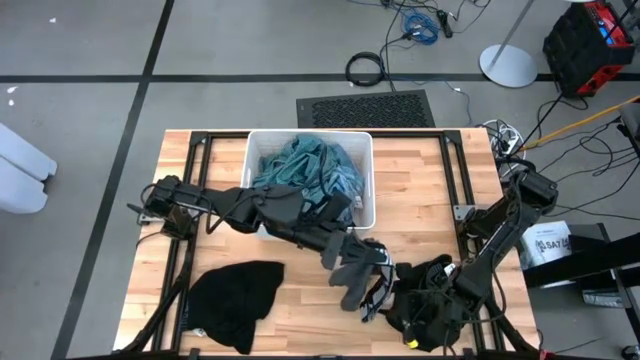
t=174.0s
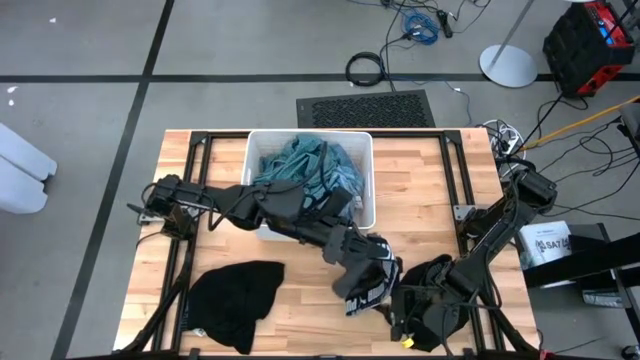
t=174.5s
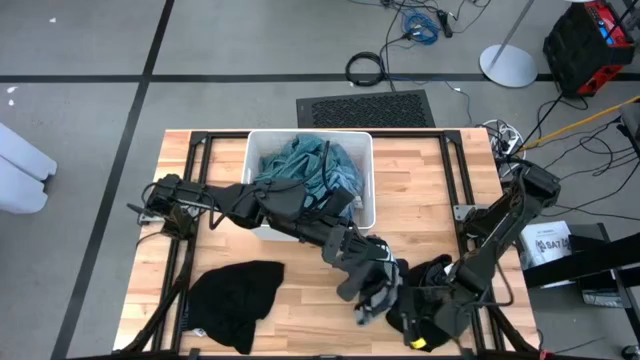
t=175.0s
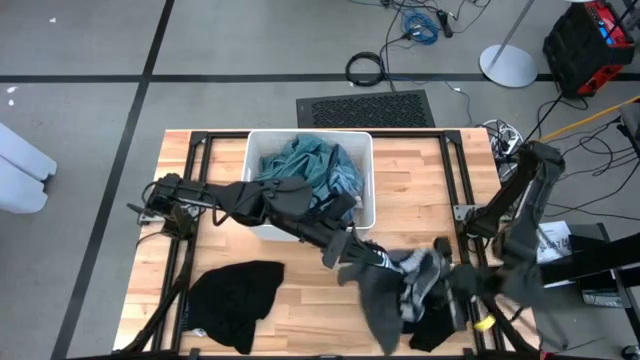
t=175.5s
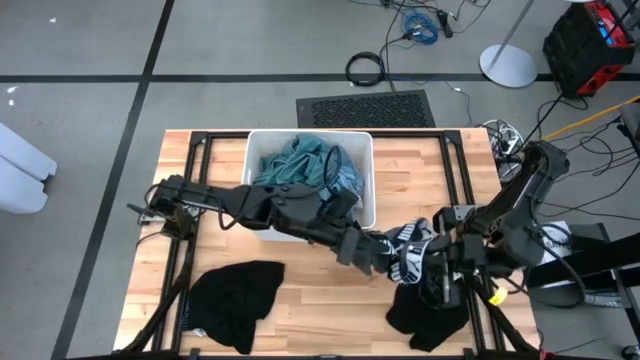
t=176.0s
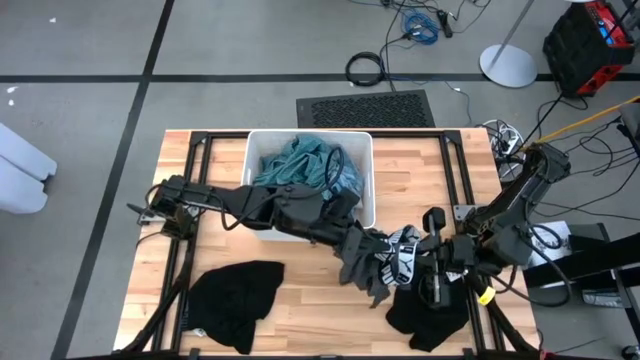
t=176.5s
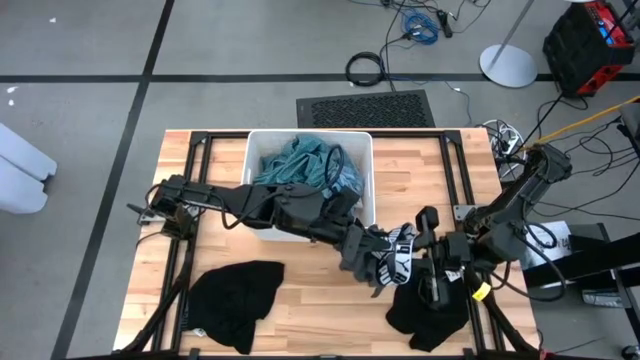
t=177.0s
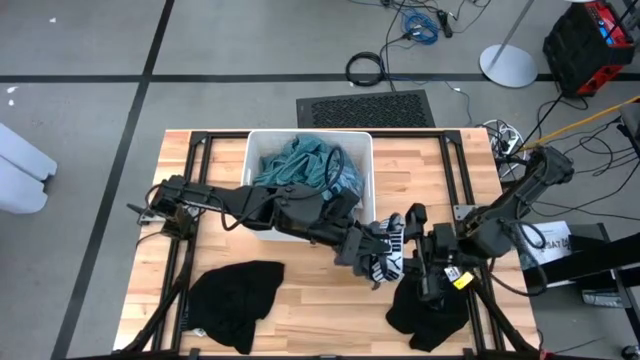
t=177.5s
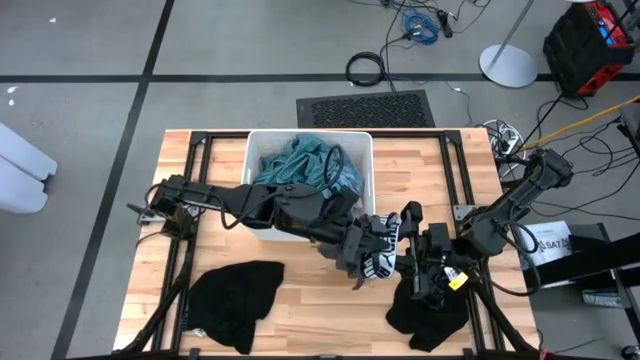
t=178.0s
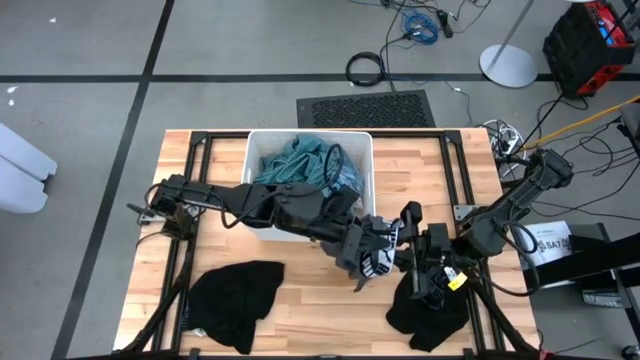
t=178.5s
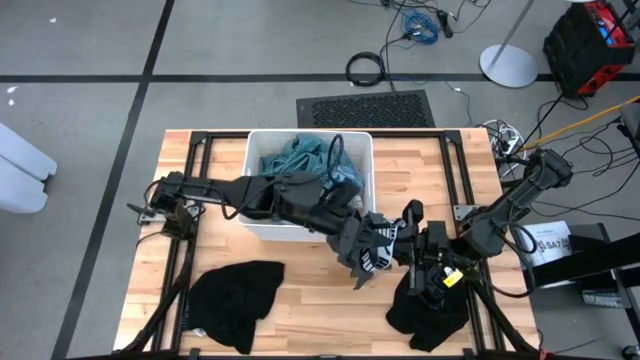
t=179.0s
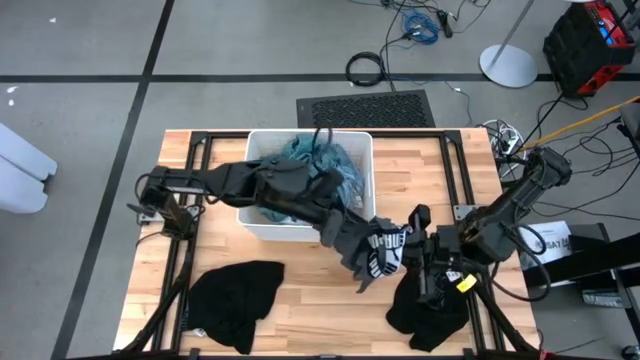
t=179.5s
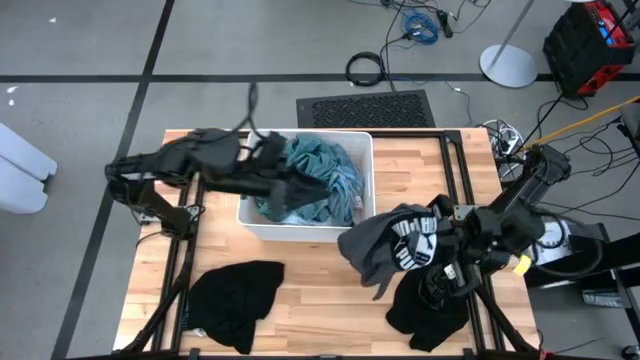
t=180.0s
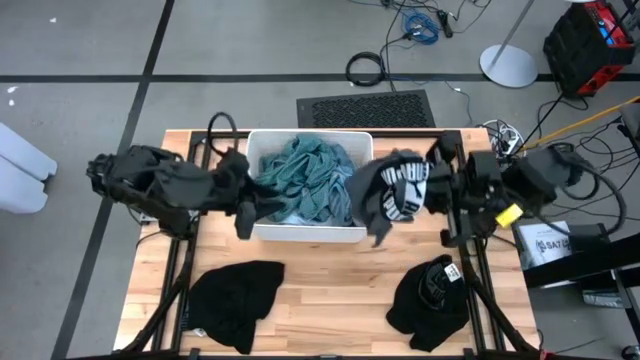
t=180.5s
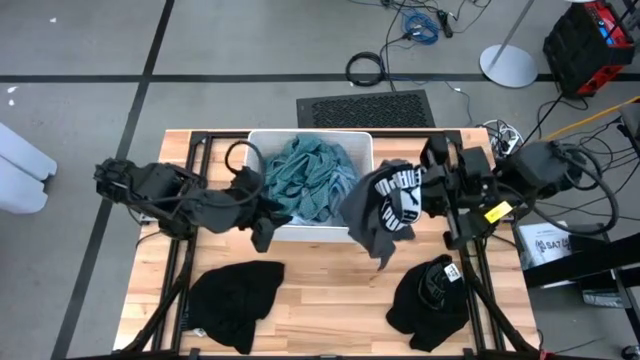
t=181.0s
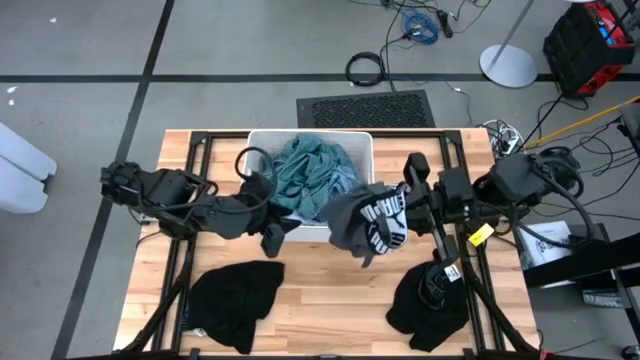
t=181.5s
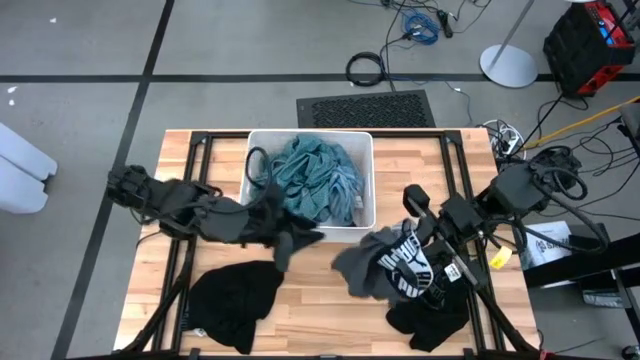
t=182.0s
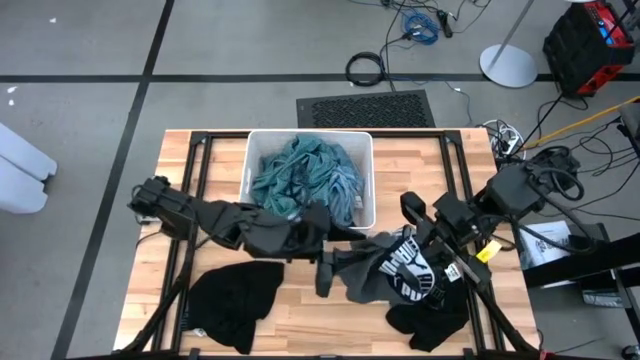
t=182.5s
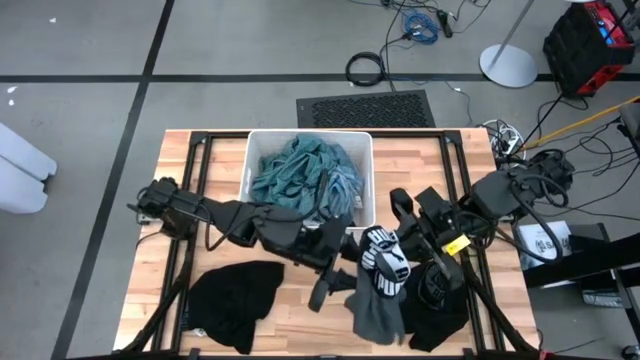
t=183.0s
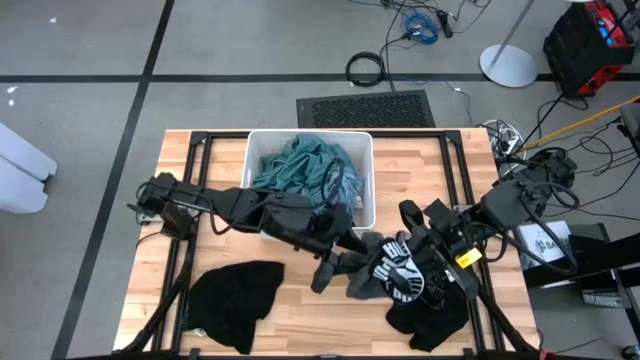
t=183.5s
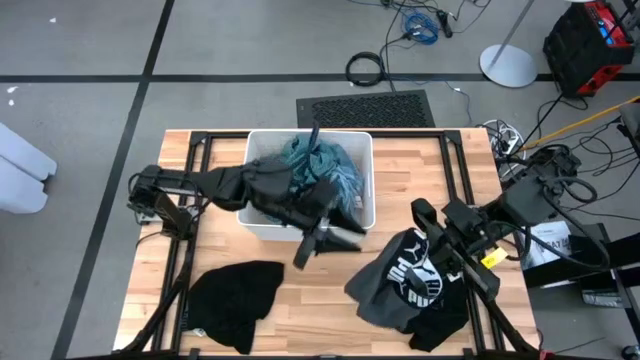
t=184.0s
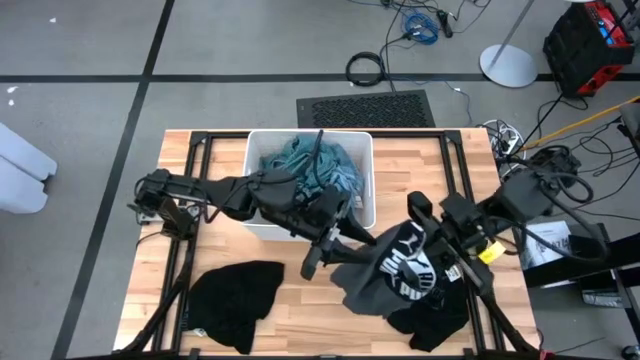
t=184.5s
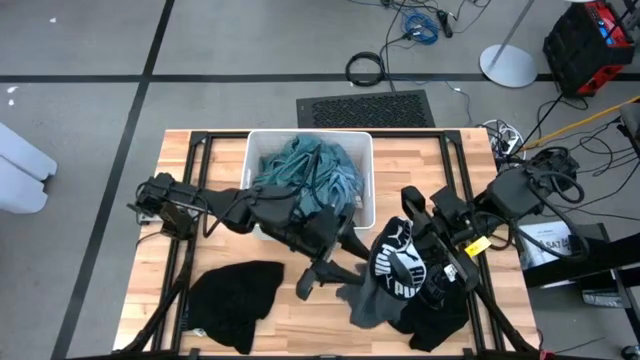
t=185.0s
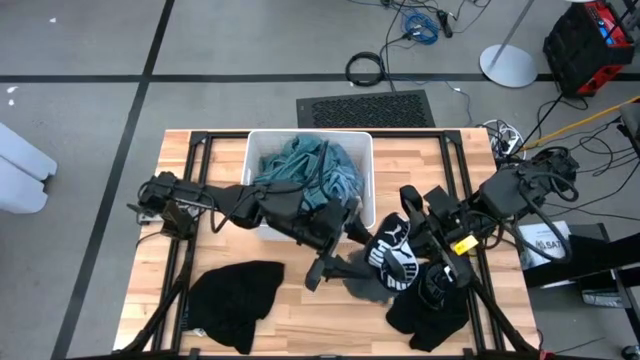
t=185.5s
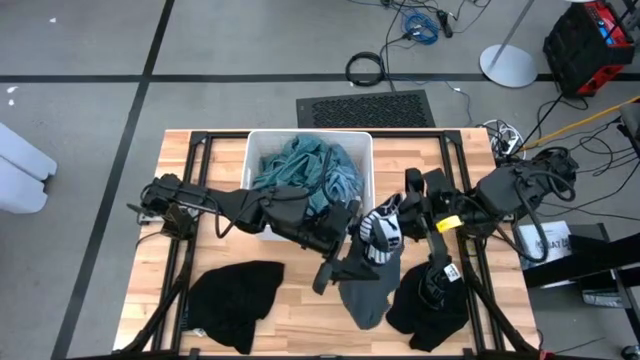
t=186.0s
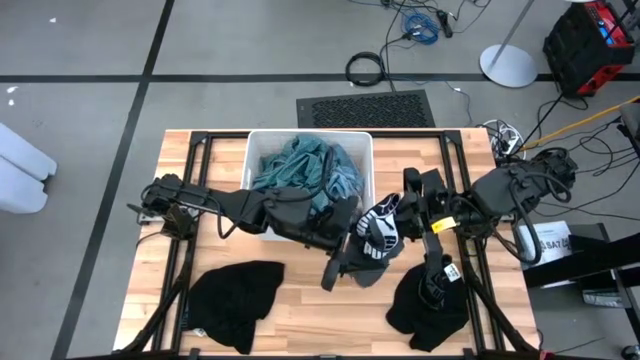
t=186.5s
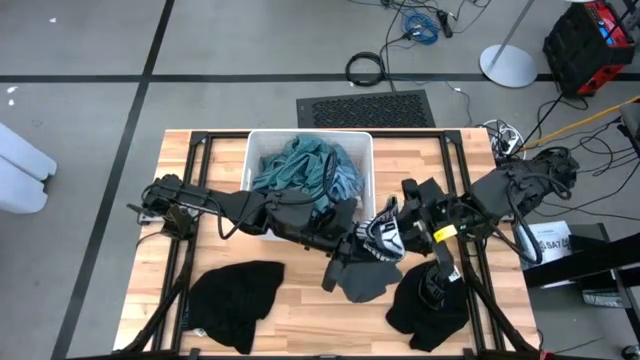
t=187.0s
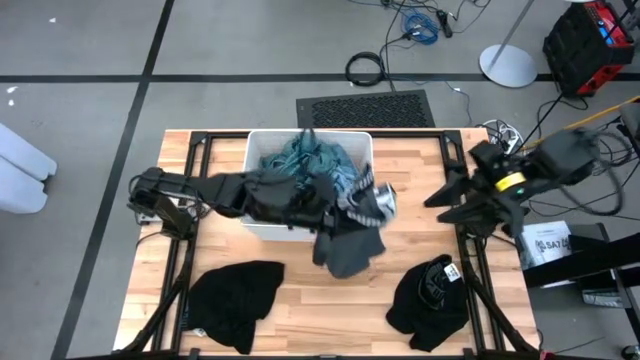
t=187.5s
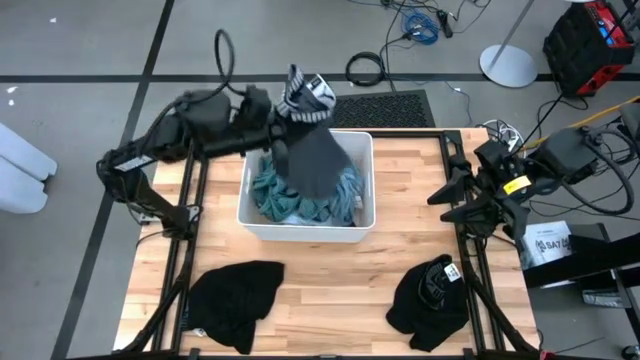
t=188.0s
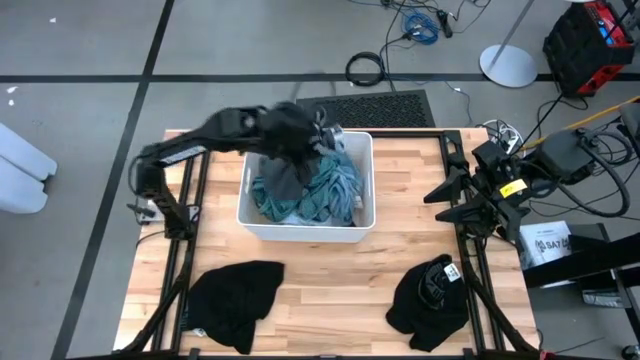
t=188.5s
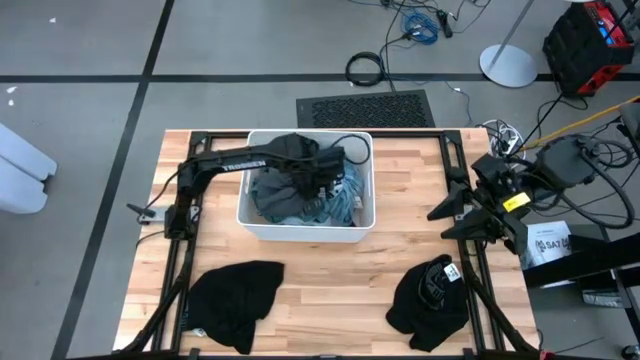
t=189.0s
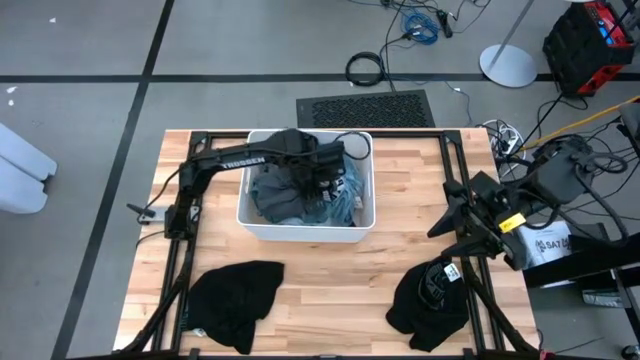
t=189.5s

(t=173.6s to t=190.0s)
Task: Sort clothes
Put the gray boxer into the white laundry bin

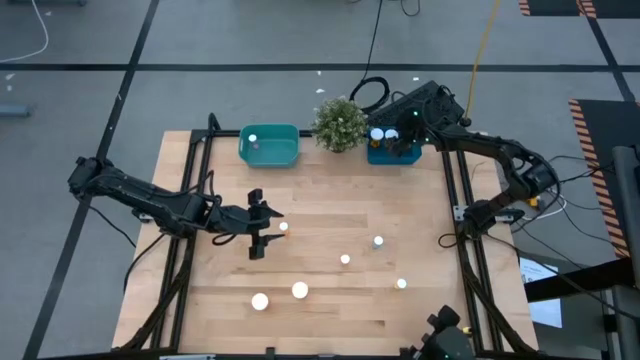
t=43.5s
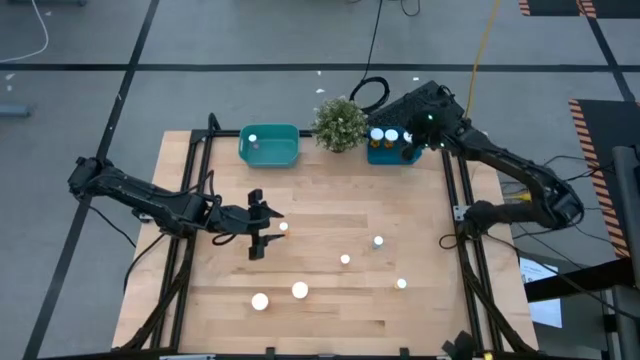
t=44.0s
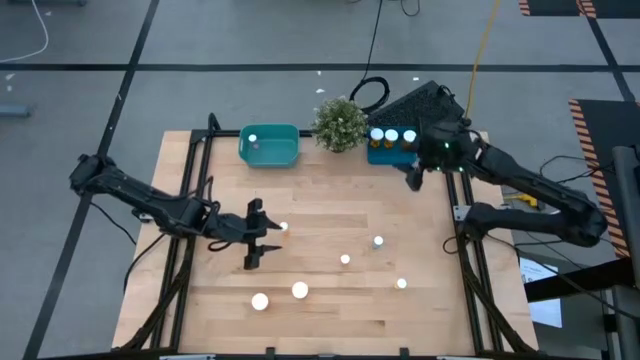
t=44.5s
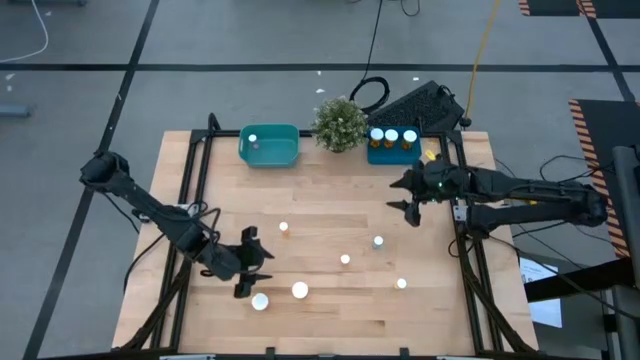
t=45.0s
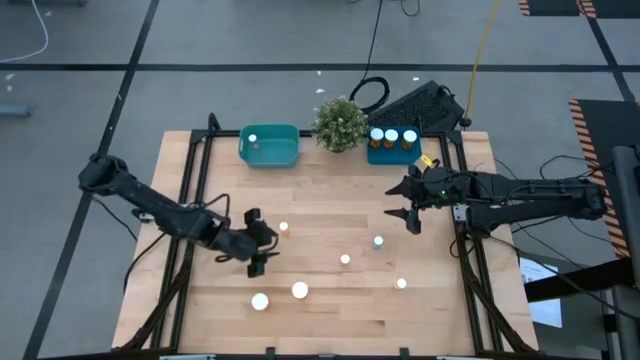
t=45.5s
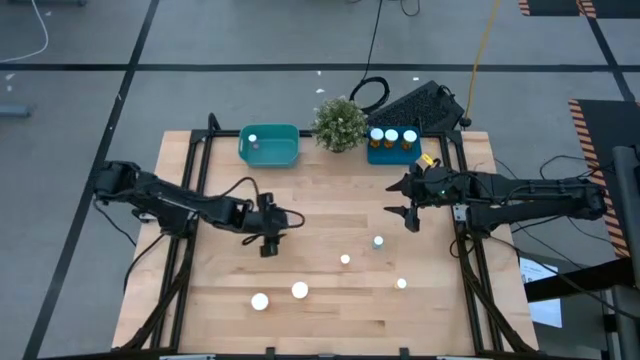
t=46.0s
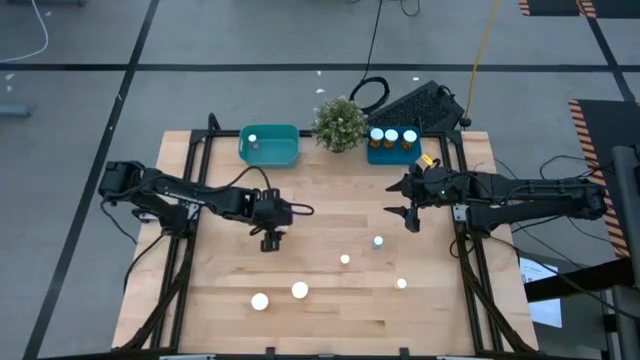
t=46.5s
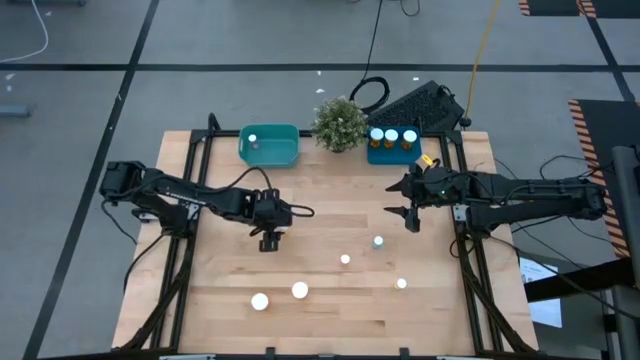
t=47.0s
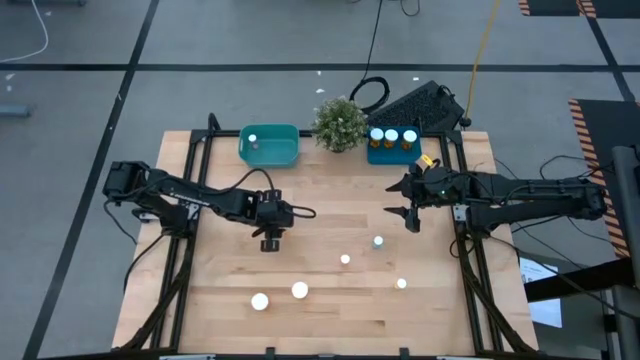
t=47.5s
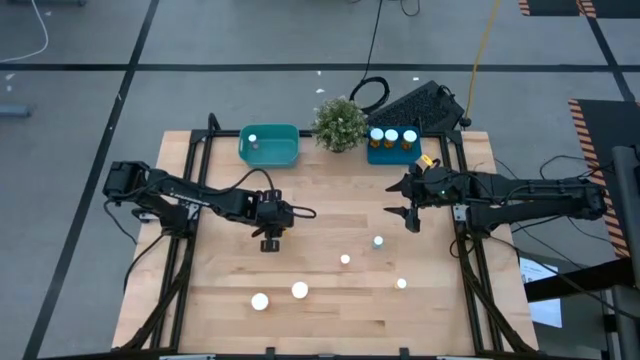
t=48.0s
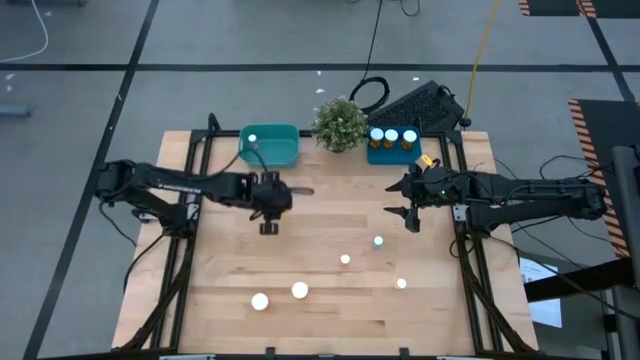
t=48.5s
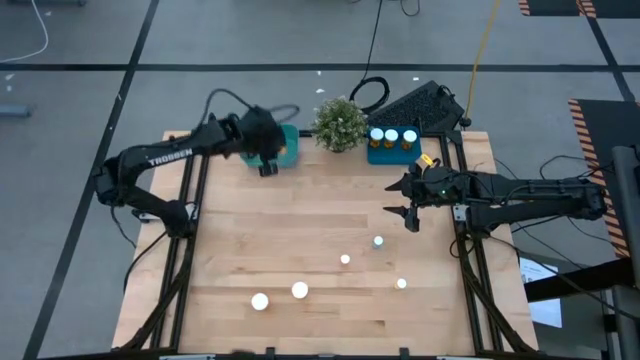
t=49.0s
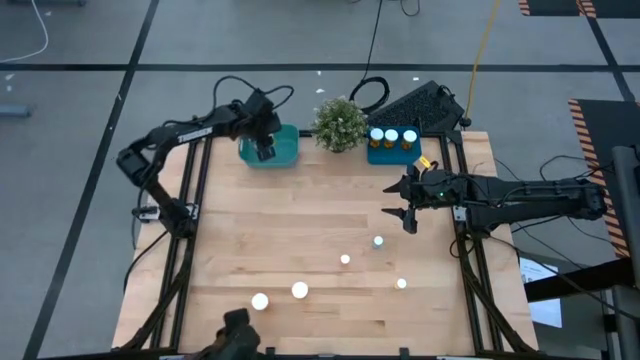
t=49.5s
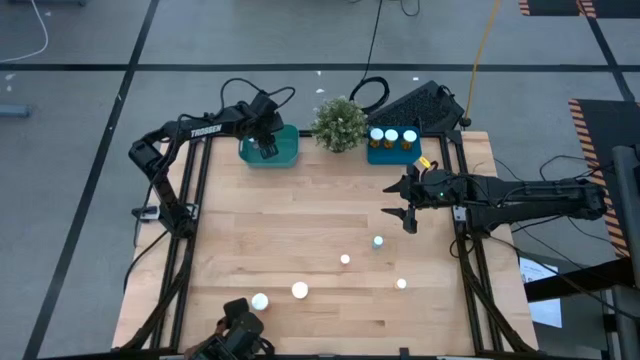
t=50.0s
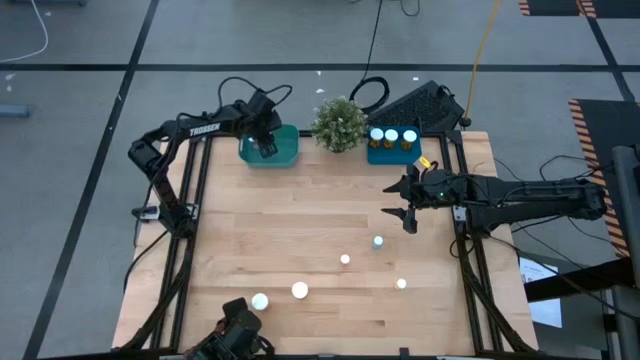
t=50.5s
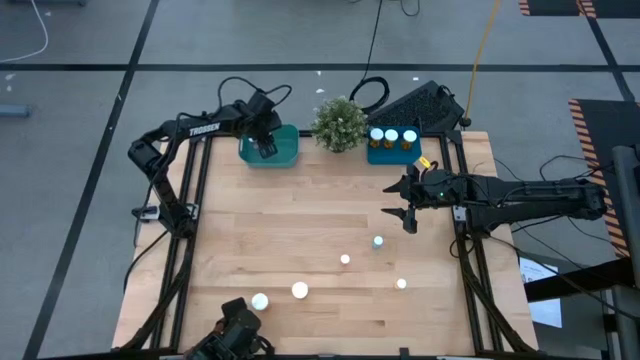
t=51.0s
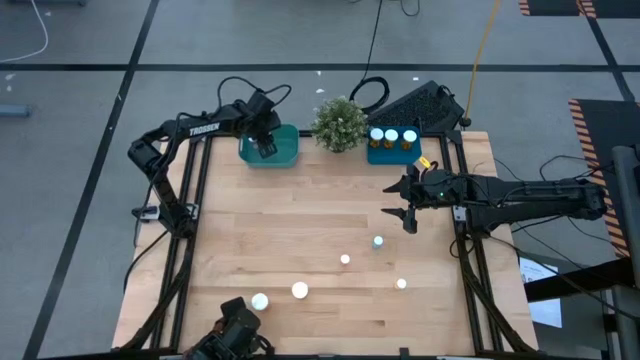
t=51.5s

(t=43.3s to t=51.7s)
Task: Pick and place medicine bottles into bin by pill shape (circle, oval)
Put the small orange pill bottle into the green bin
